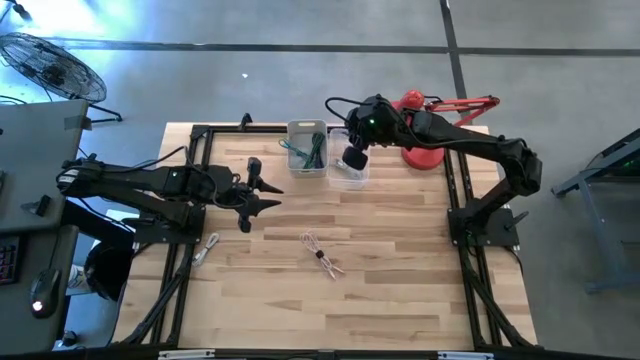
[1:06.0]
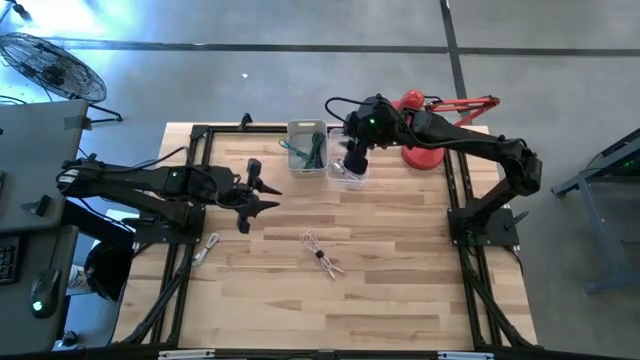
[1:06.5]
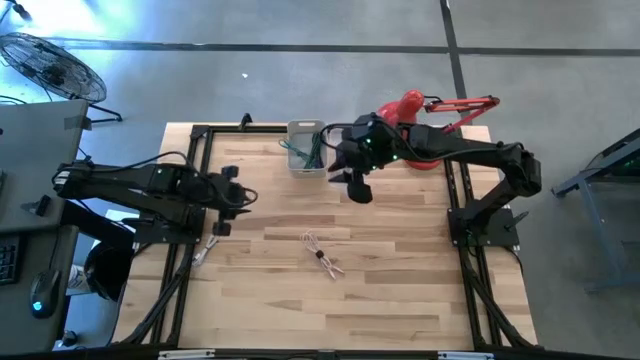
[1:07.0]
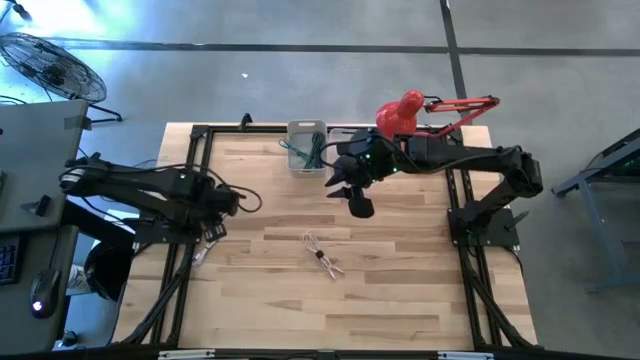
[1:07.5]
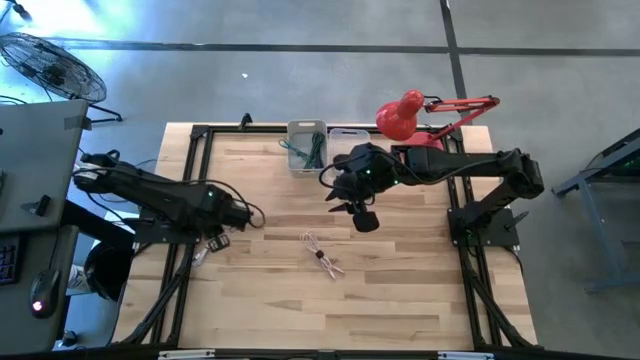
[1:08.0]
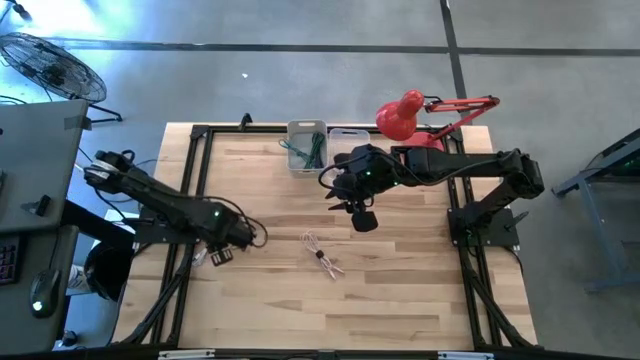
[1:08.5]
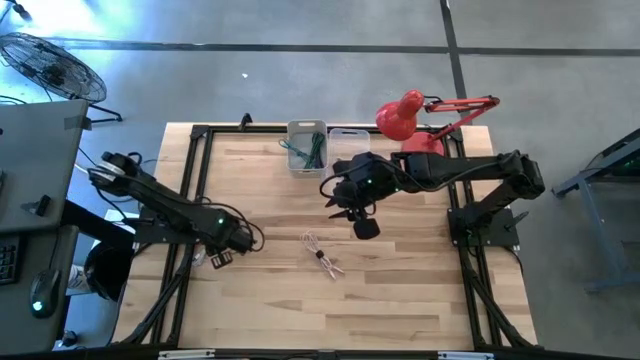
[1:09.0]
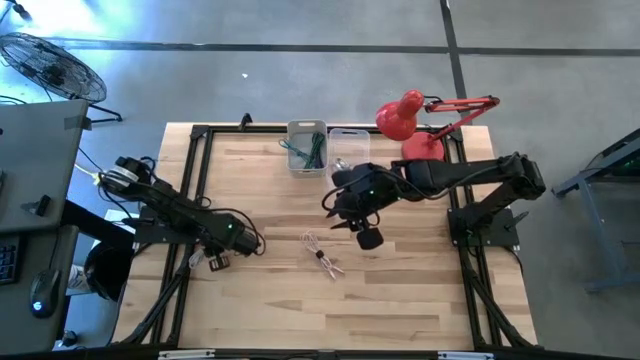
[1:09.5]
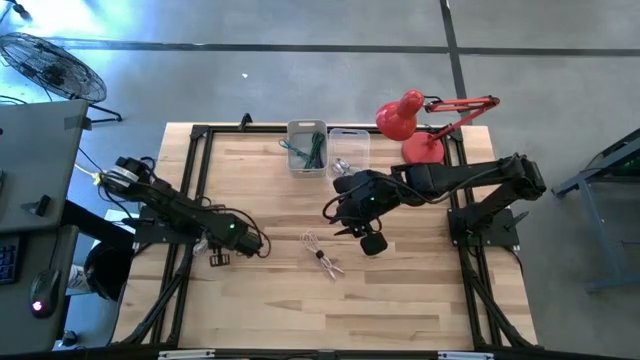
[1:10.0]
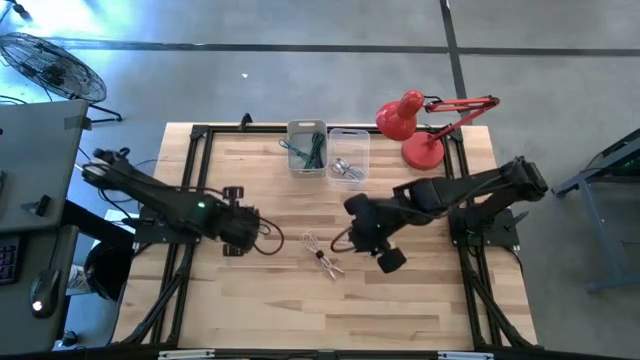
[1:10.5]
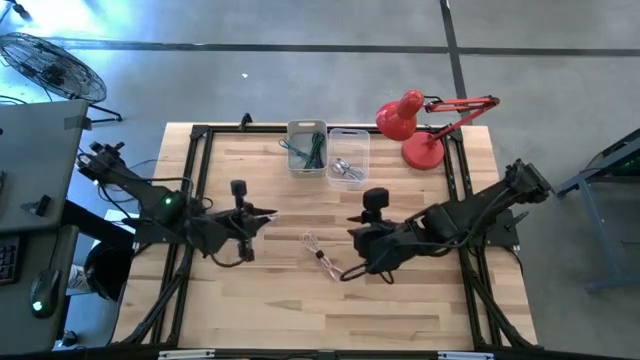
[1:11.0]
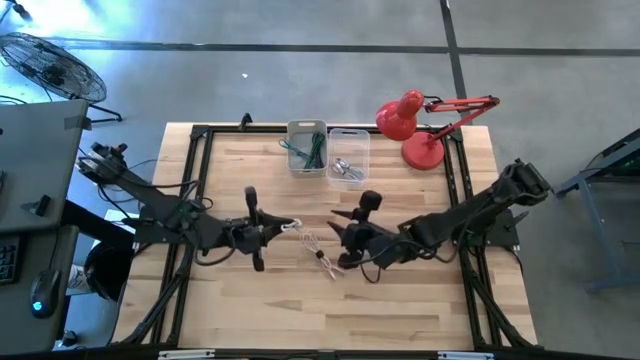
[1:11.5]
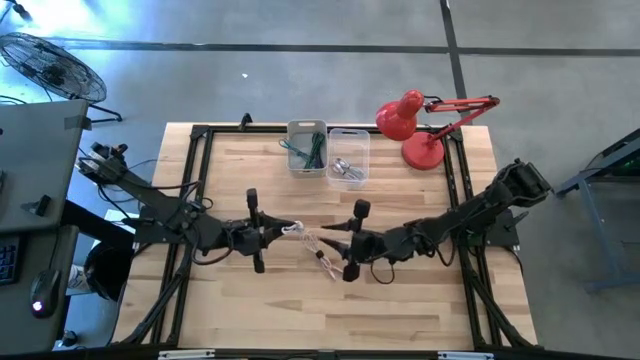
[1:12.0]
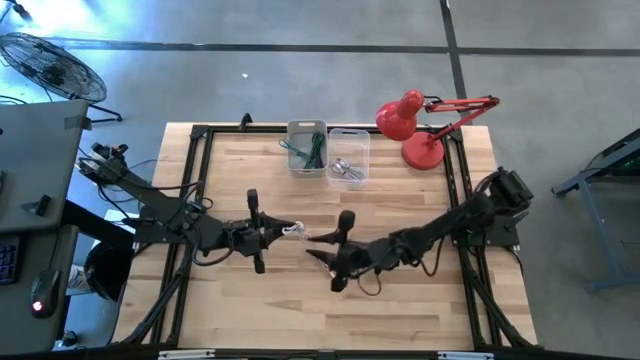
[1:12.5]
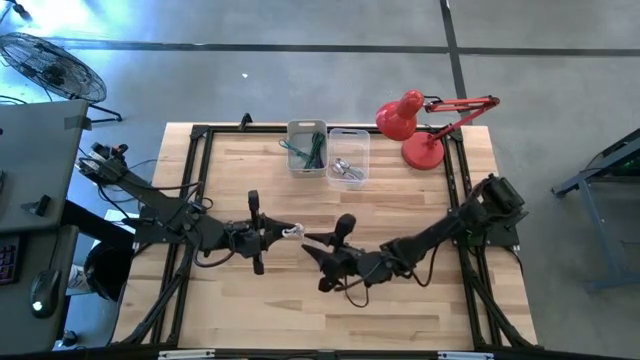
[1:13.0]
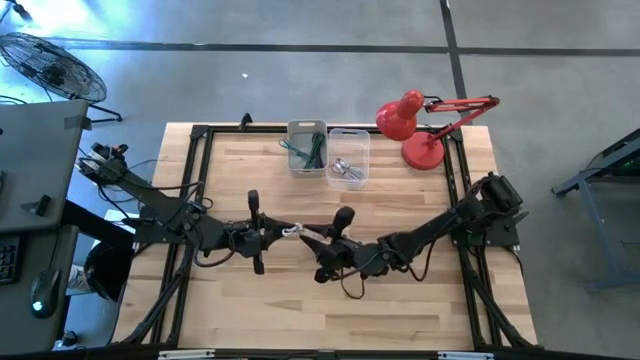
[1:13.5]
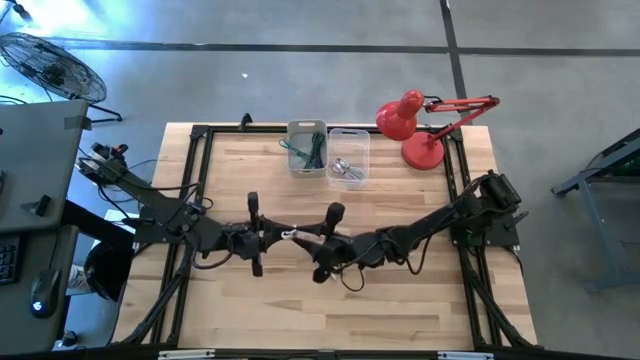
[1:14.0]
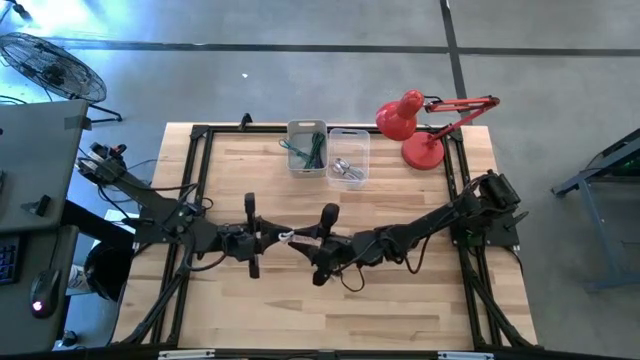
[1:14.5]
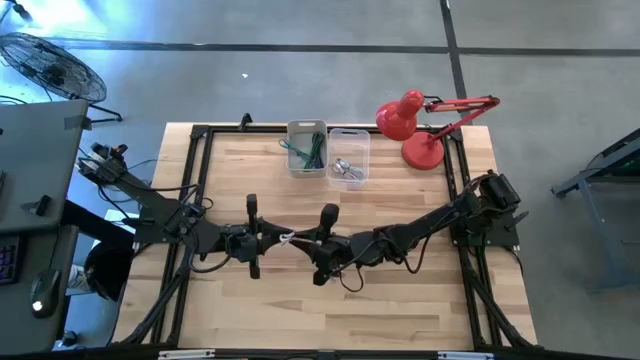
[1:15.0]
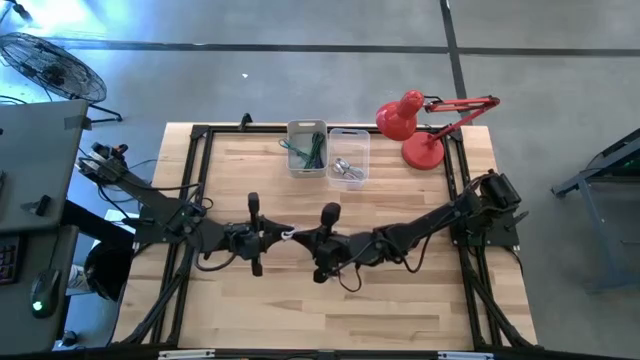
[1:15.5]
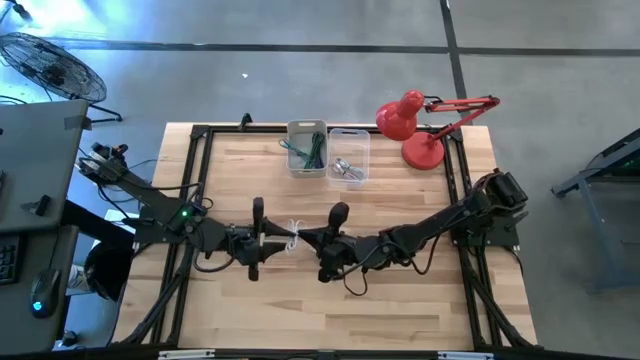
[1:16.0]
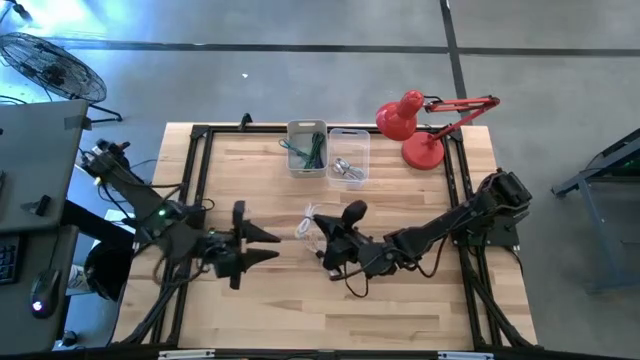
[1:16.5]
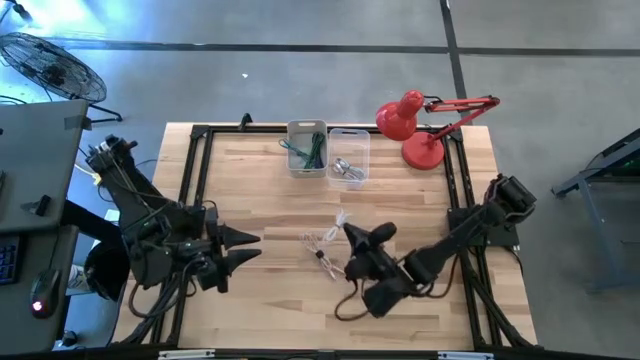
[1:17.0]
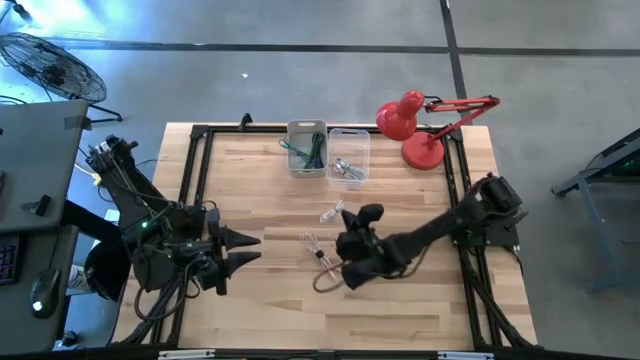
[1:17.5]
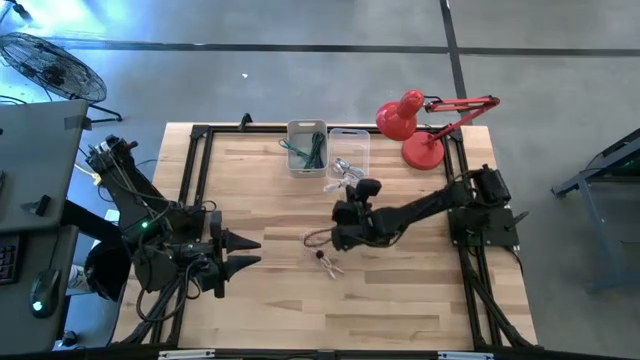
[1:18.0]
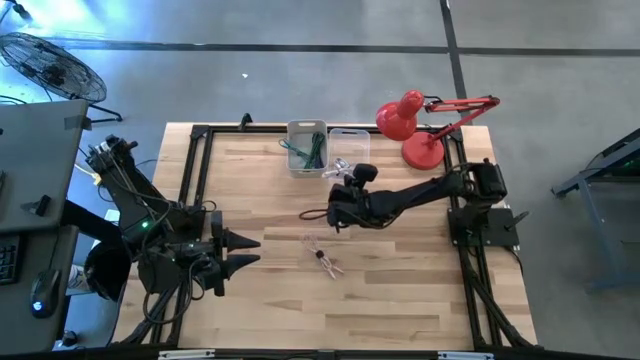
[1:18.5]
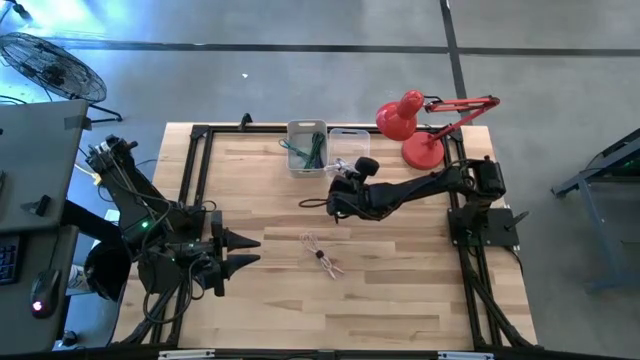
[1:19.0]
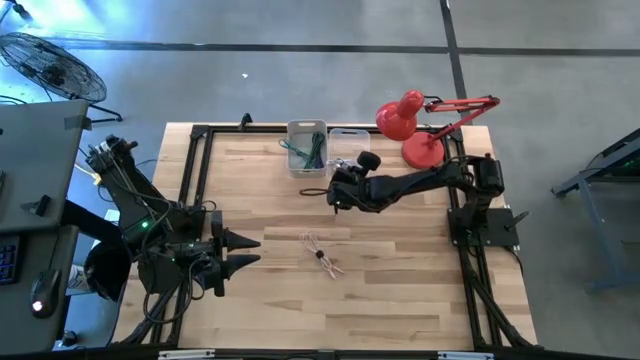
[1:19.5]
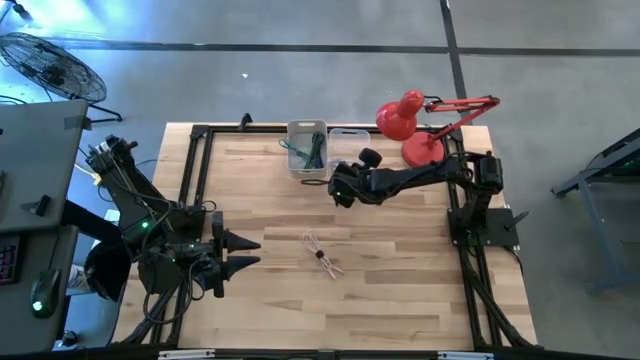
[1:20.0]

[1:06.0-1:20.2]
Task: Pick & Place USB Port
Put the white charger cable into the transparent bin

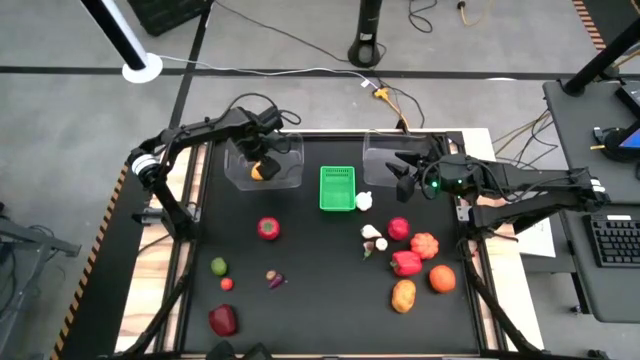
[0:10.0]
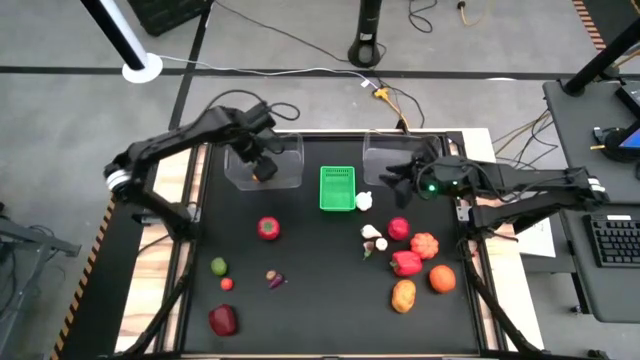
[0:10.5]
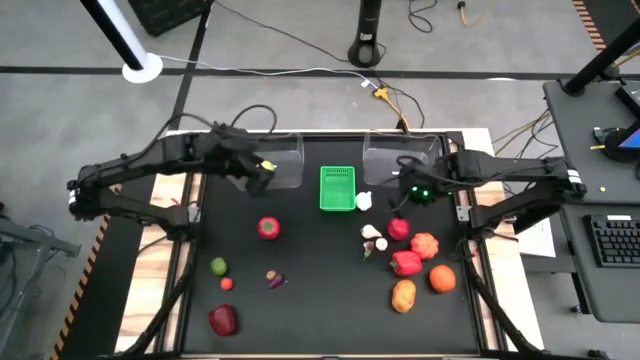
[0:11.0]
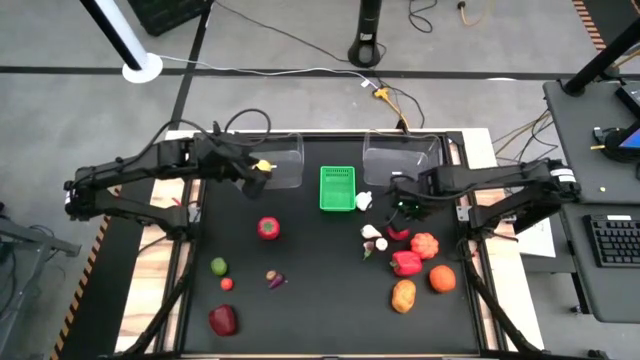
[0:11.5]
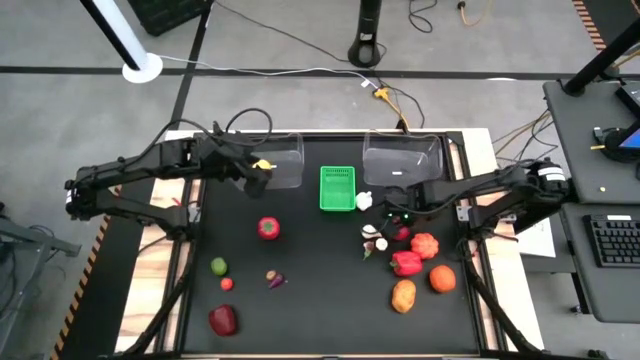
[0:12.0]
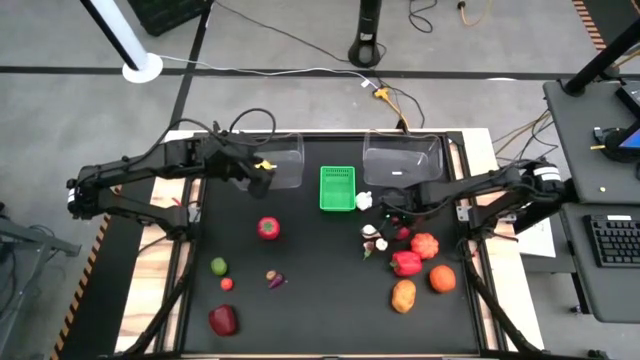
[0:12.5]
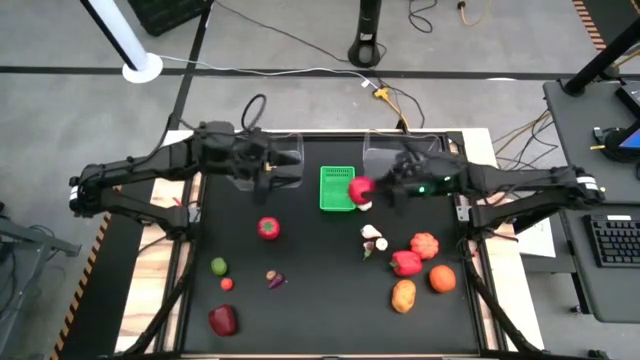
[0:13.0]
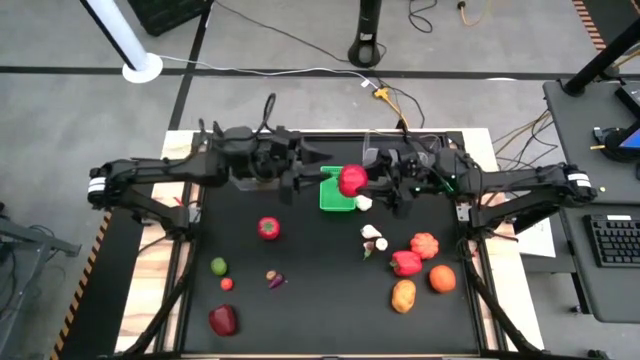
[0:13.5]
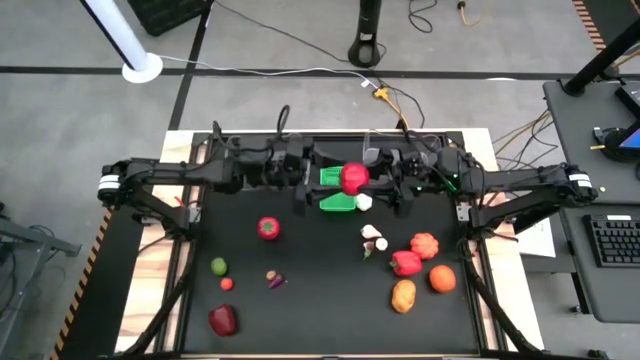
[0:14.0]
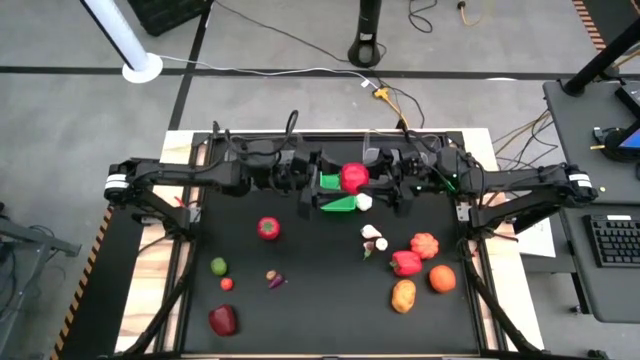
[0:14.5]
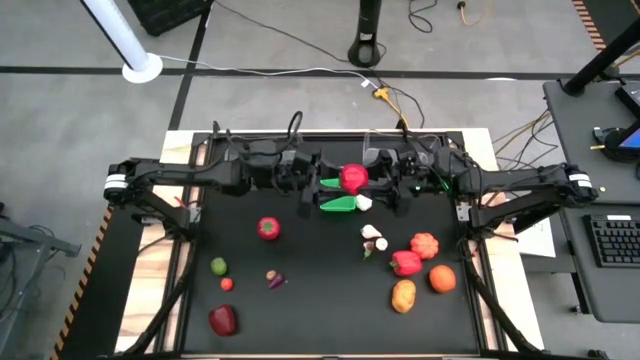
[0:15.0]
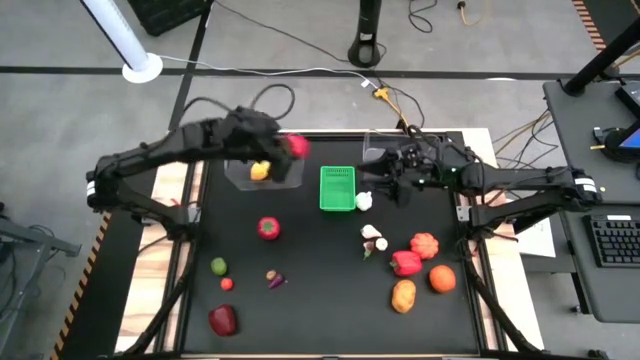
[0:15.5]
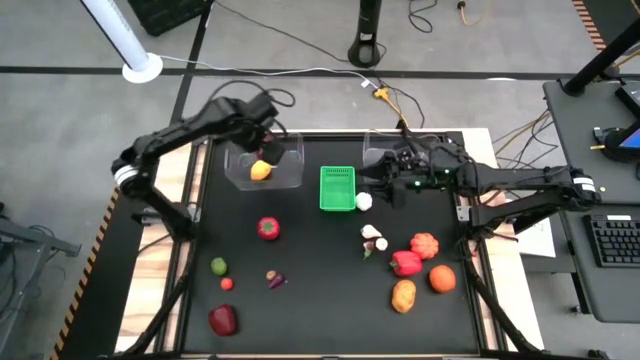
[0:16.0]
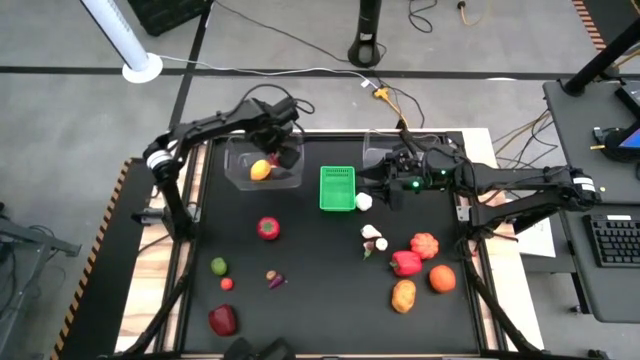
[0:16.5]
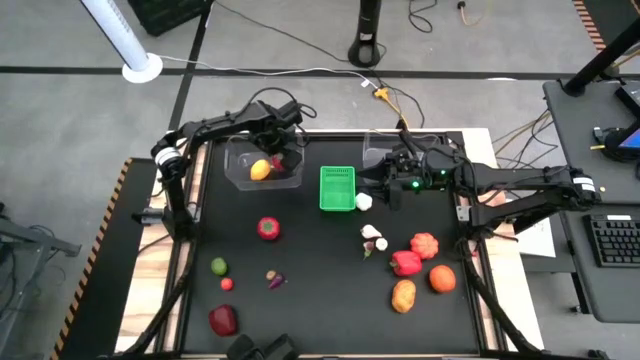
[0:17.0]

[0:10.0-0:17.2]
Task: Sort produce into baskets
Put the right big tomato into the left transparent bin
